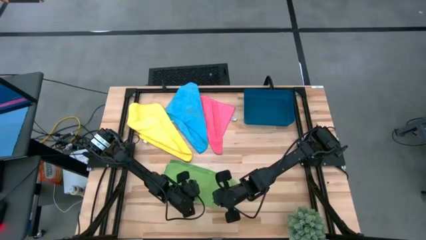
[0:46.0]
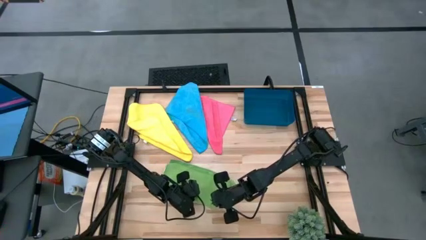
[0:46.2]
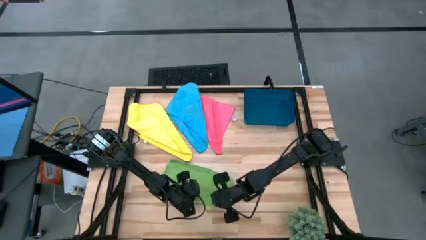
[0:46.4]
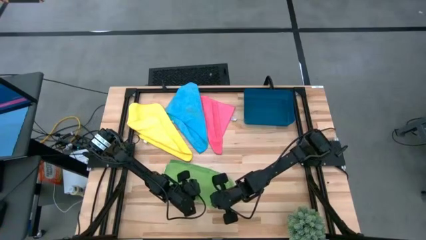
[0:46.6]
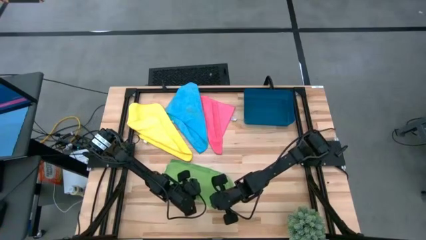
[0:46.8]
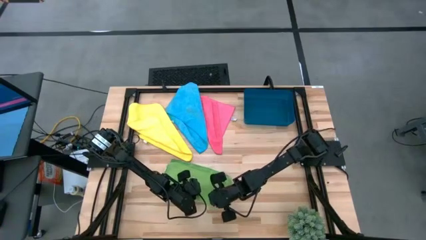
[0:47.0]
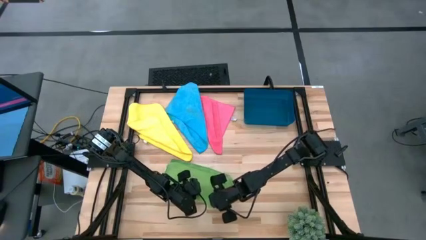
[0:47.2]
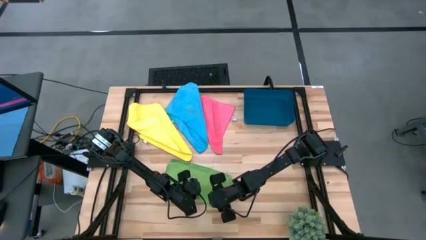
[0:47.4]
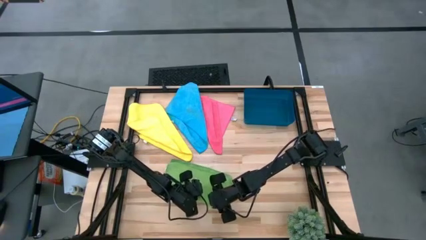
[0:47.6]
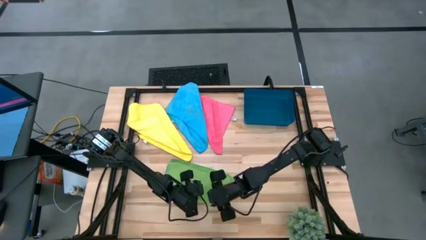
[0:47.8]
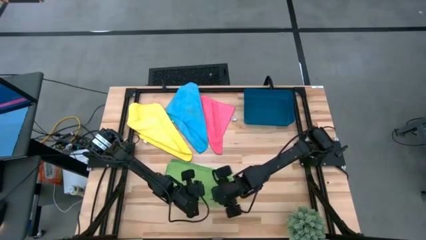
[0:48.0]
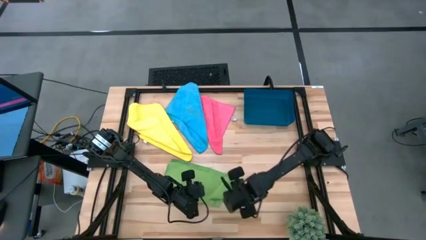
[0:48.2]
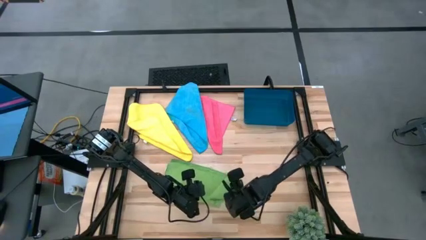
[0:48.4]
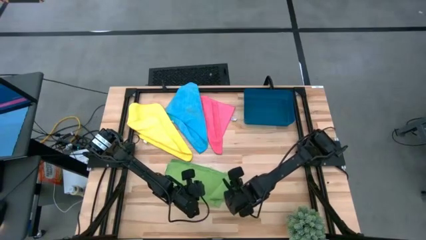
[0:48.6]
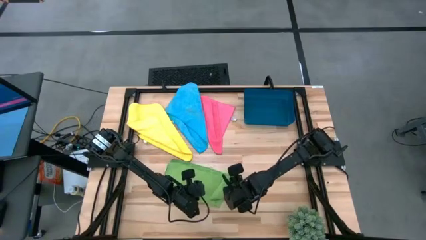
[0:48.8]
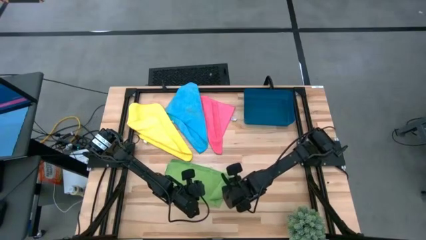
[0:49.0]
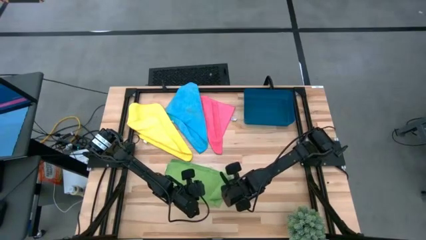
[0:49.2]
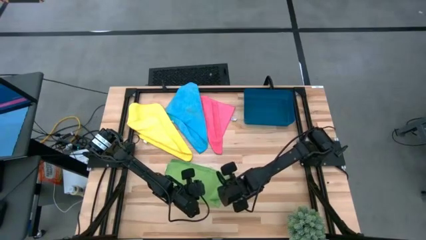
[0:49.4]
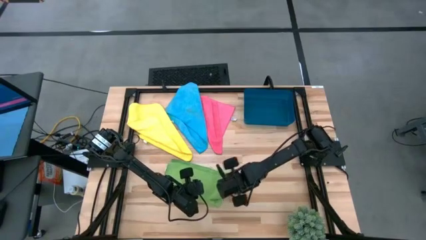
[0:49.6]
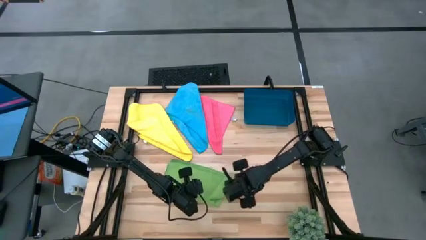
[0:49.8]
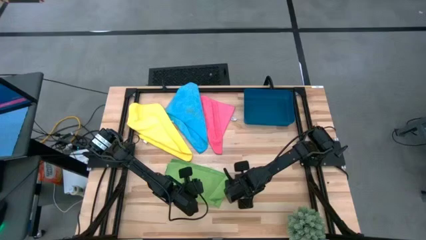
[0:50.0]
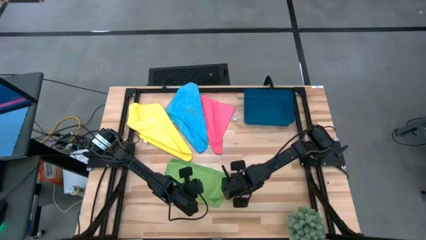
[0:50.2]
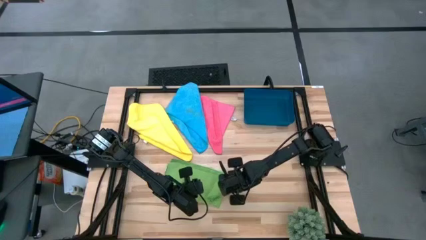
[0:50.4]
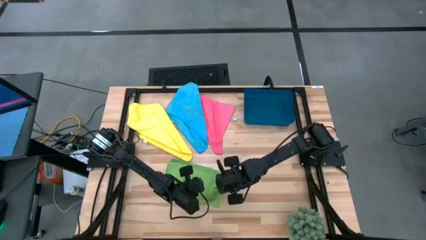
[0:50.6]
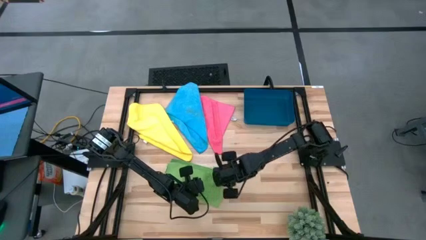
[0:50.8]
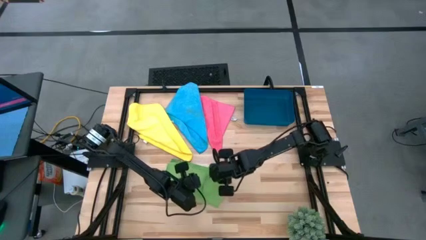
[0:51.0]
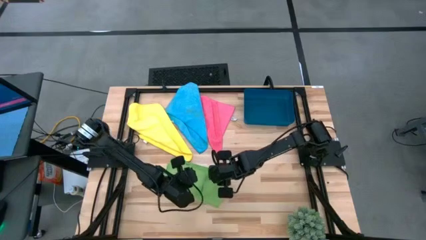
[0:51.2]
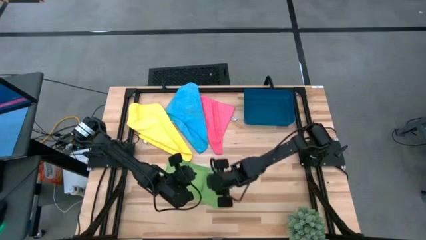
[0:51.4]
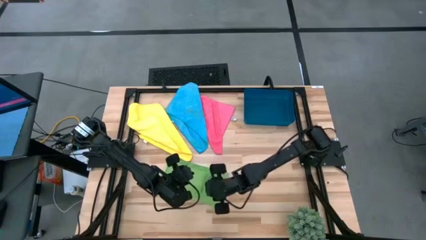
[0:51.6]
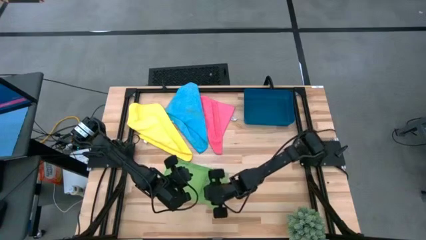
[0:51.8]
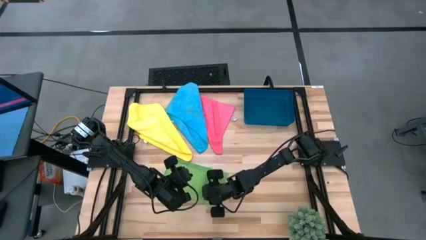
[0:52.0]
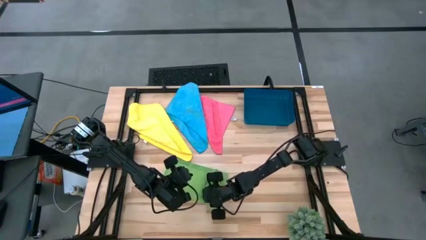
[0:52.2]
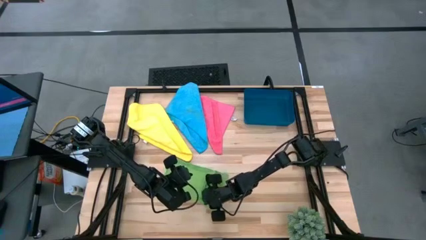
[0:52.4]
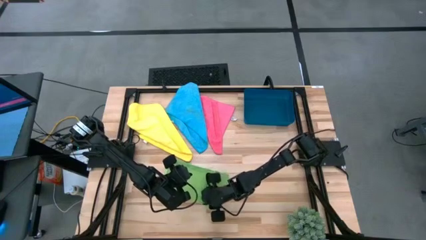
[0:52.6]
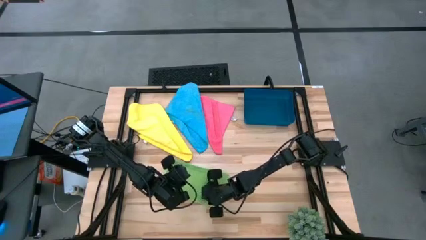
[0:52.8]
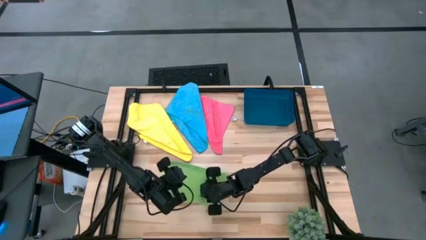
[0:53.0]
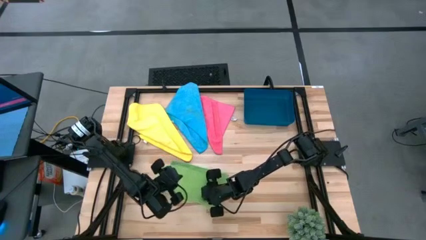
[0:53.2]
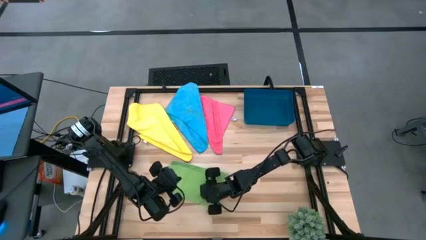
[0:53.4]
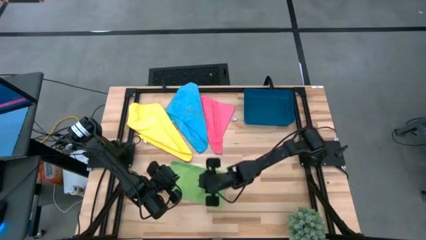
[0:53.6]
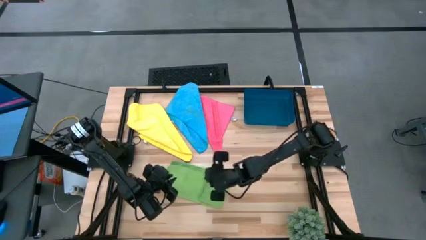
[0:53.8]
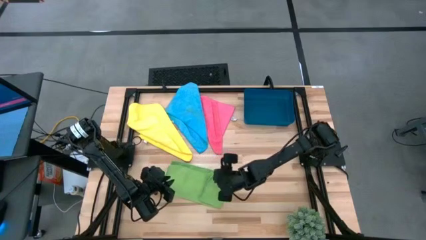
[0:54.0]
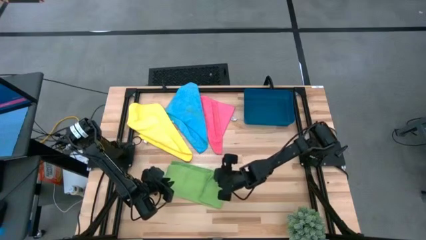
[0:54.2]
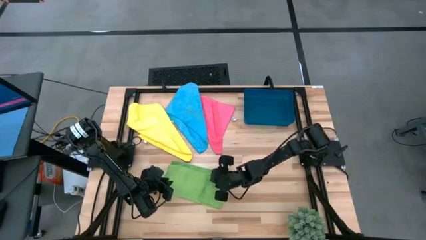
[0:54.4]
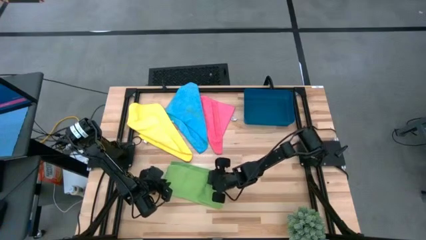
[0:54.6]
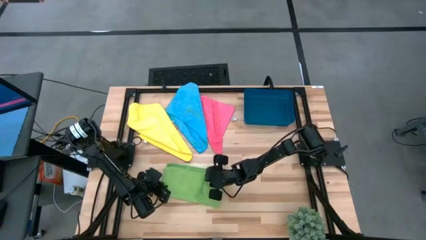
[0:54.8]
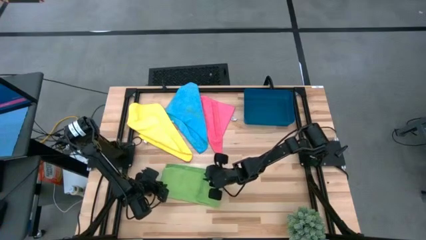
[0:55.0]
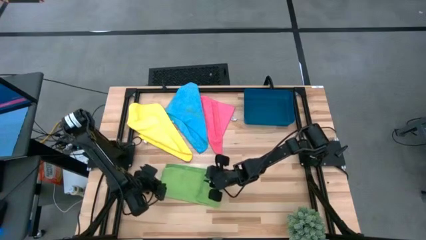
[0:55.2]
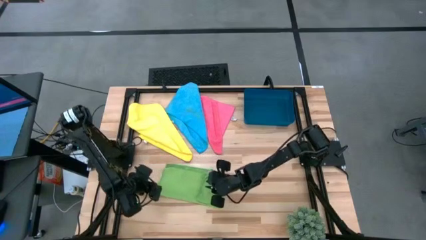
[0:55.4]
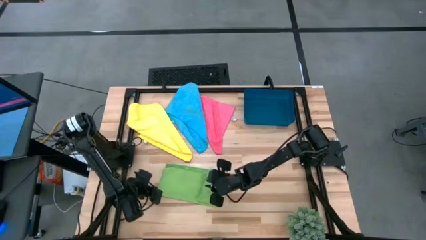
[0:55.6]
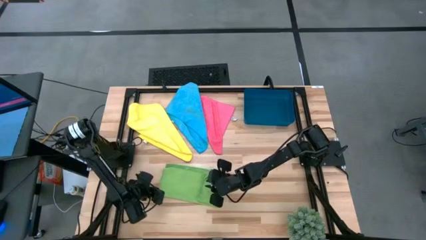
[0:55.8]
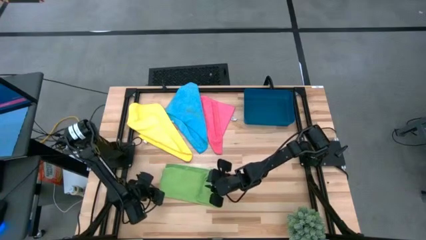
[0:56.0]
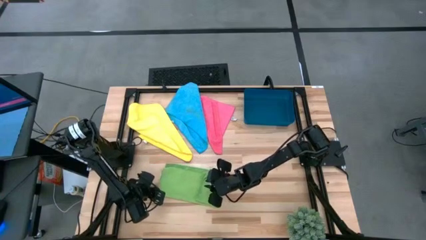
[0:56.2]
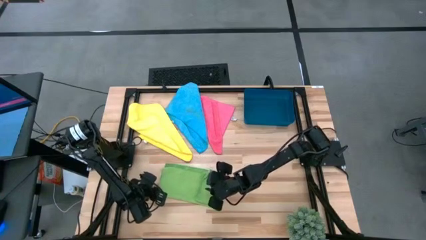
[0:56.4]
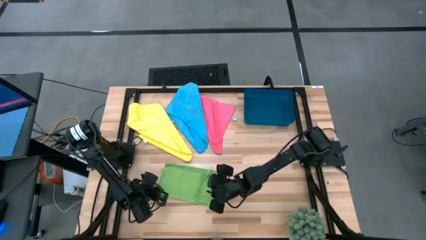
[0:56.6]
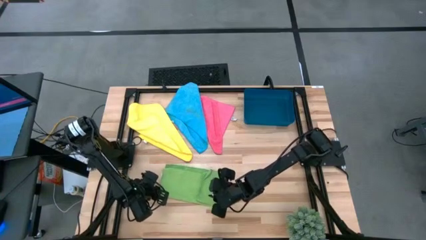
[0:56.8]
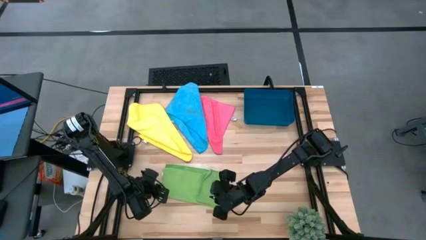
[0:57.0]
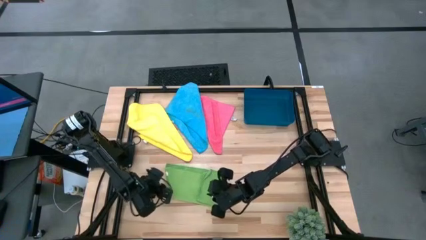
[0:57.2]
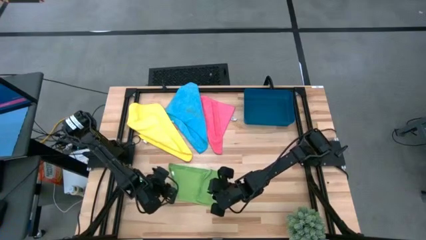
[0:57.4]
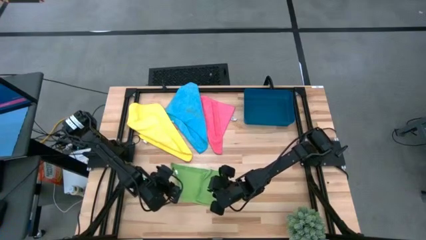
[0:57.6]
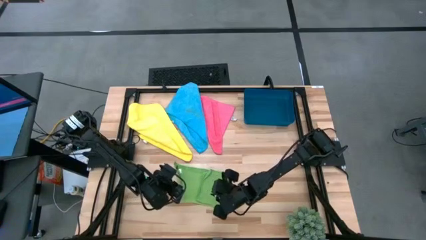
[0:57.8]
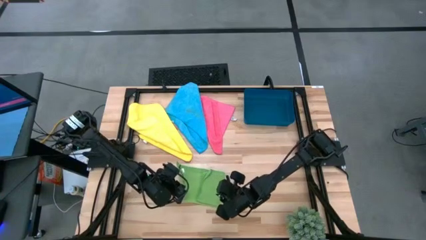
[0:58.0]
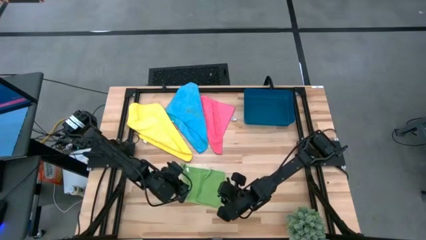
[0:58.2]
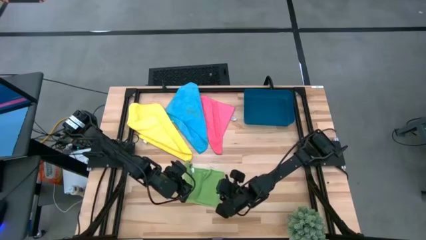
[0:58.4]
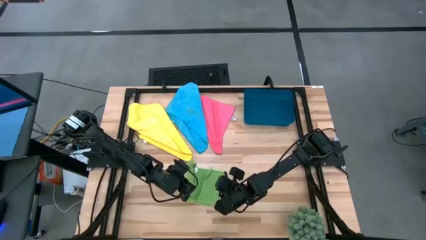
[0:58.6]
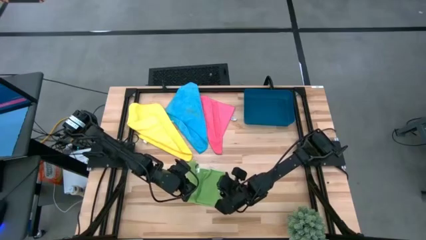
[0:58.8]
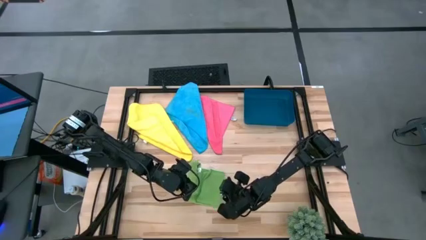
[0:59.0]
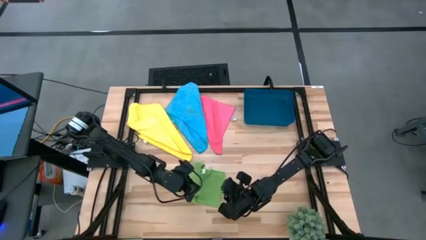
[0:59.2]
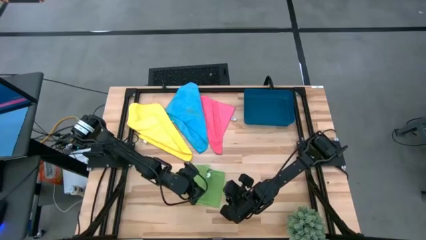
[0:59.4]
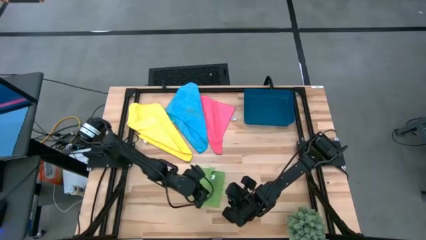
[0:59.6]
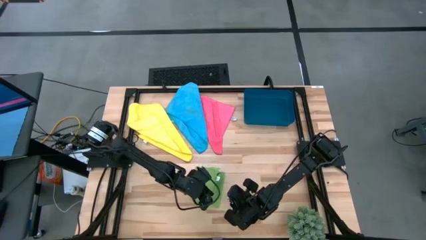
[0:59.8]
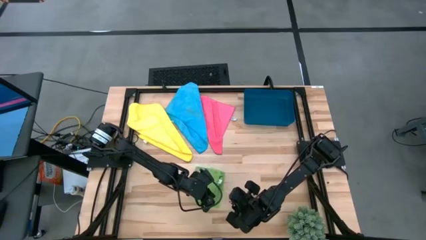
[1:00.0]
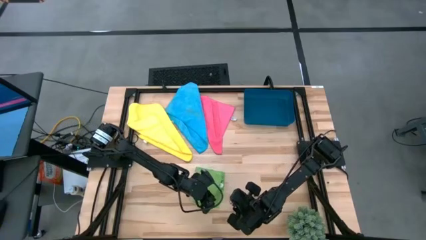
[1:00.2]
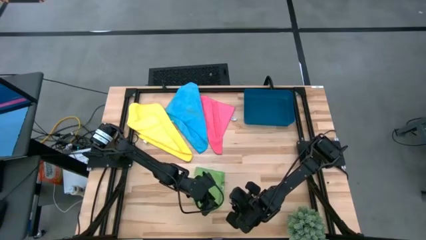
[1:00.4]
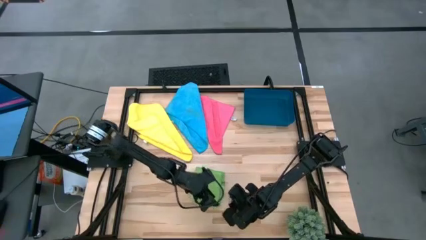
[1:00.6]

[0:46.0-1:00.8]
Task: Fold microfiber towels
Fold the green microfiber towel

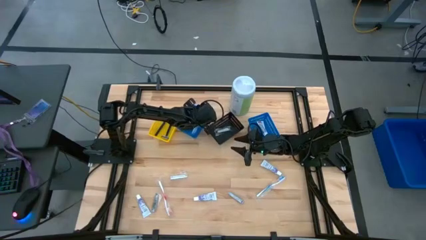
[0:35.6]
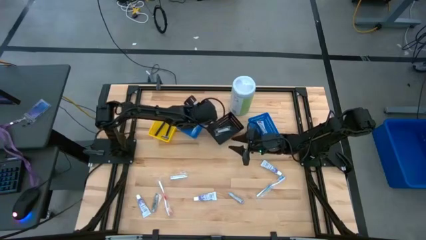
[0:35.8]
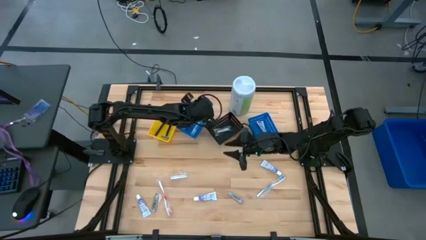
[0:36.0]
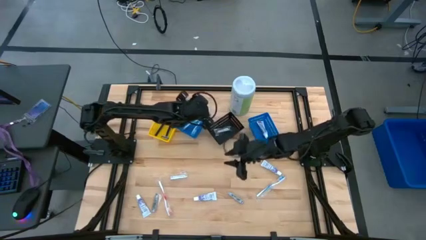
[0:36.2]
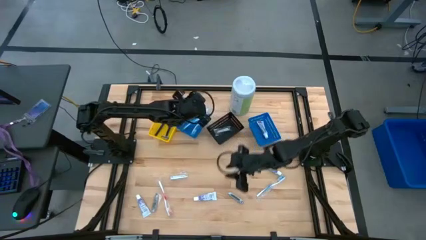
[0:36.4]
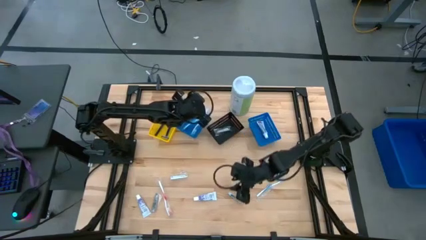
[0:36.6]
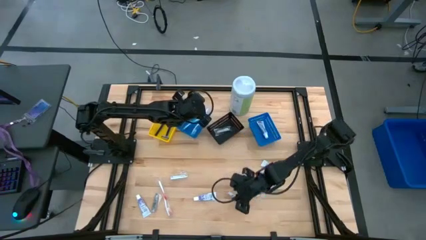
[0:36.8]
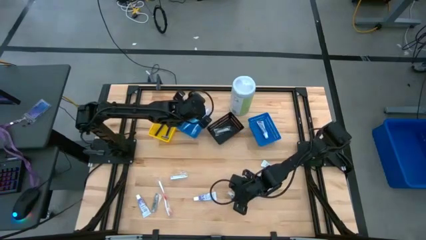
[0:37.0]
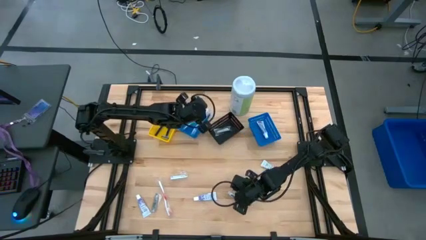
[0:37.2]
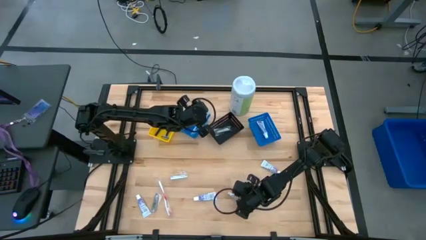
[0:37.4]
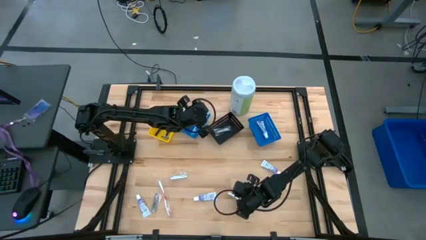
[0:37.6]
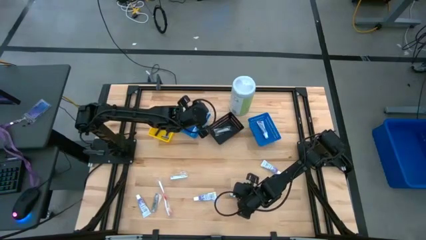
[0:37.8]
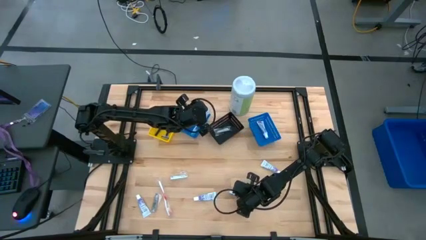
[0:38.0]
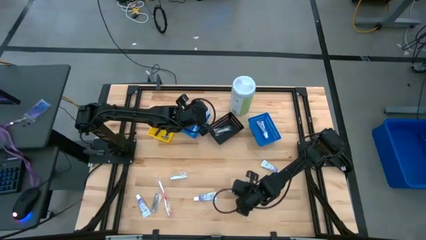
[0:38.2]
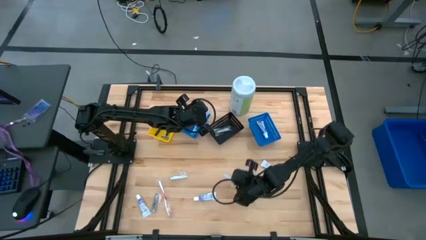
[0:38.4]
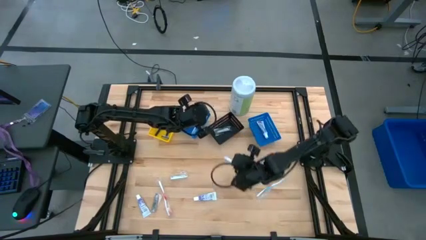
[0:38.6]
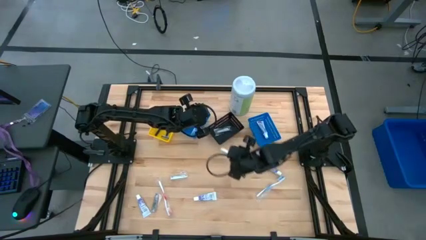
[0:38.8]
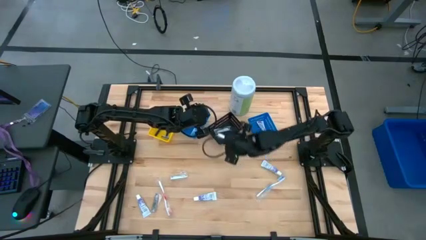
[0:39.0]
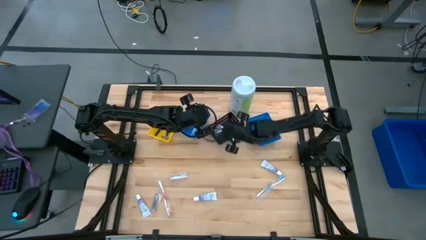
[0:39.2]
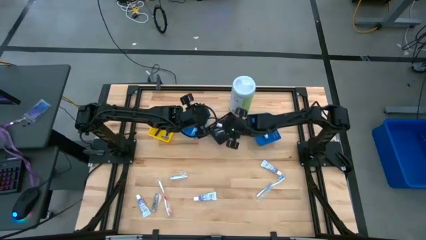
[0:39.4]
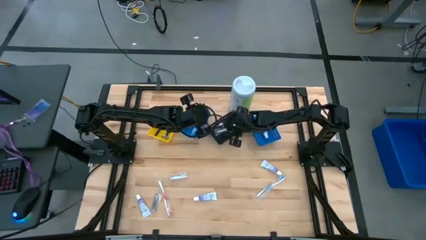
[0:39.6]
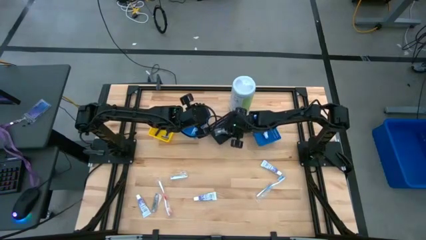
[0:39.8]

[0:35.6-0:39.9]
Task: Pick & Place Travel size toiletries
Put the silver nail cutter into the black basket
